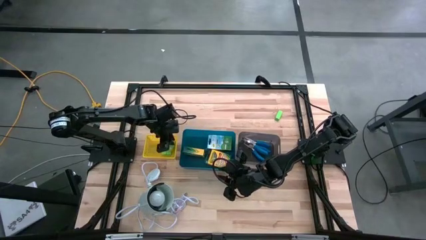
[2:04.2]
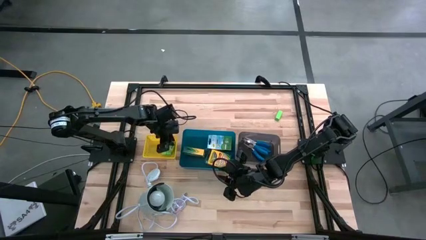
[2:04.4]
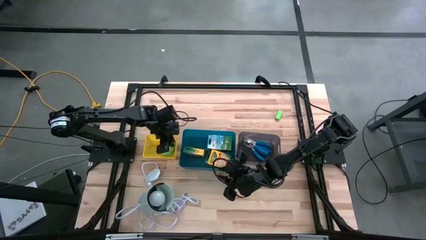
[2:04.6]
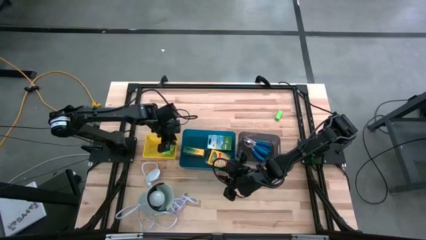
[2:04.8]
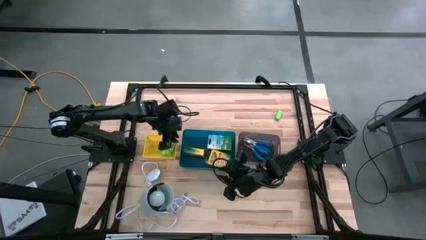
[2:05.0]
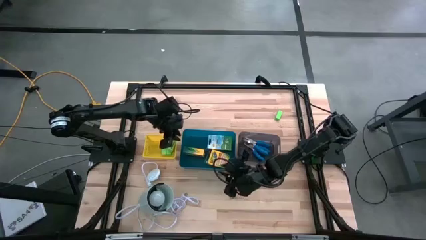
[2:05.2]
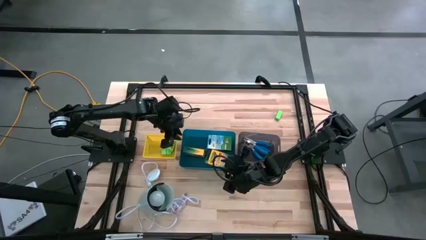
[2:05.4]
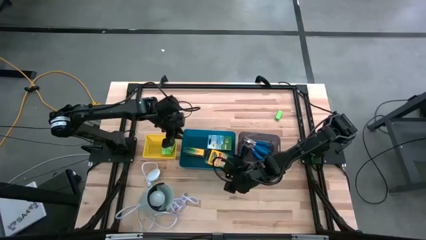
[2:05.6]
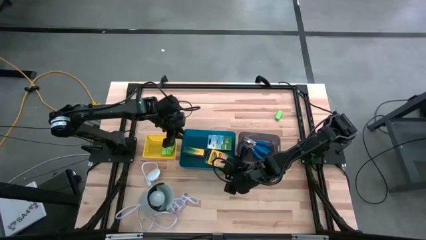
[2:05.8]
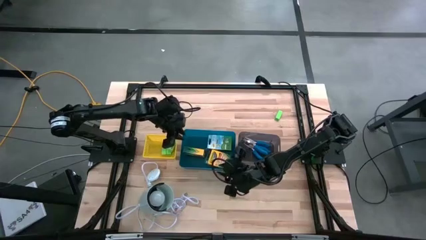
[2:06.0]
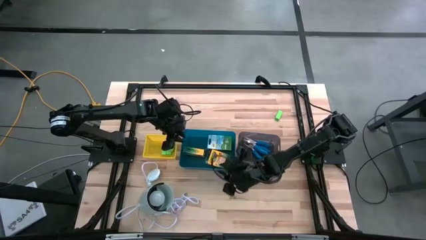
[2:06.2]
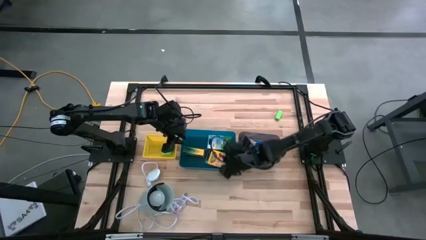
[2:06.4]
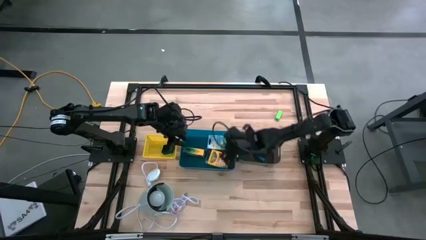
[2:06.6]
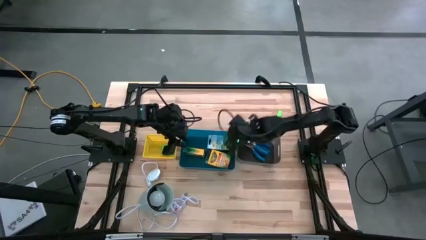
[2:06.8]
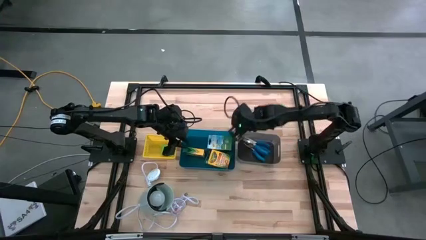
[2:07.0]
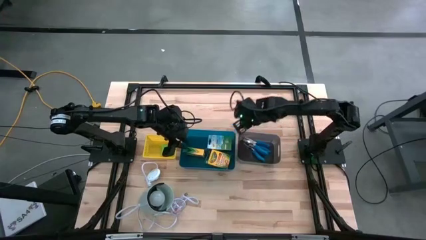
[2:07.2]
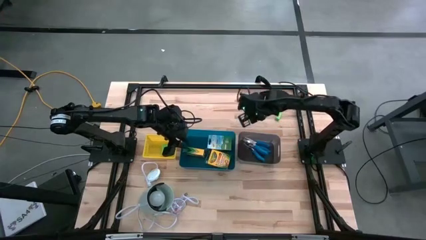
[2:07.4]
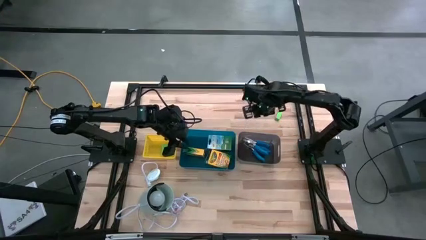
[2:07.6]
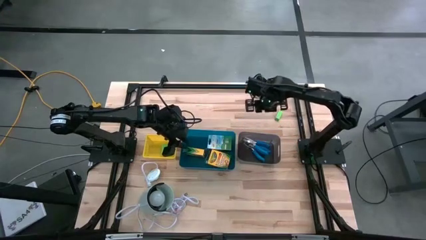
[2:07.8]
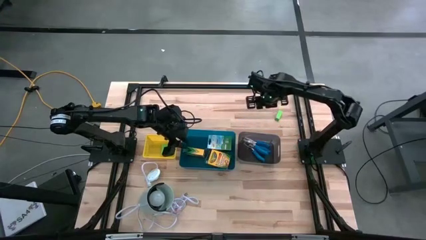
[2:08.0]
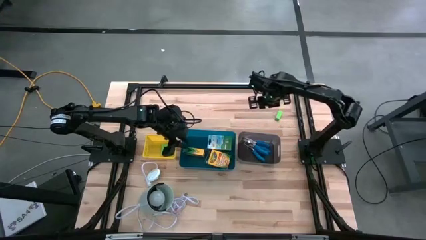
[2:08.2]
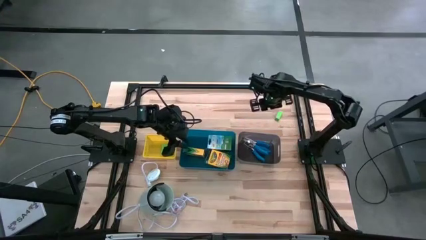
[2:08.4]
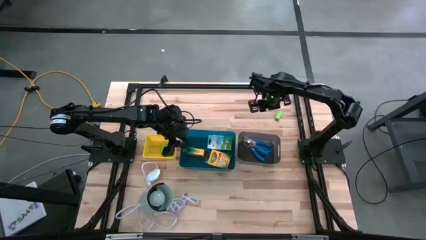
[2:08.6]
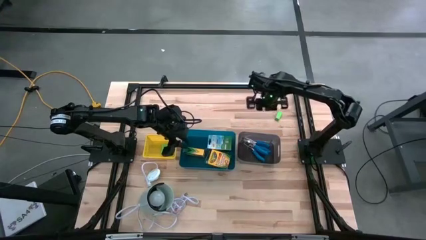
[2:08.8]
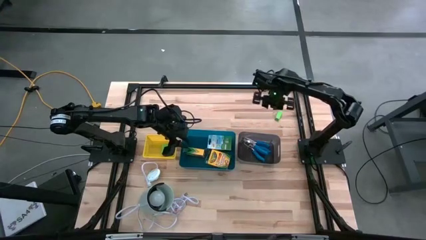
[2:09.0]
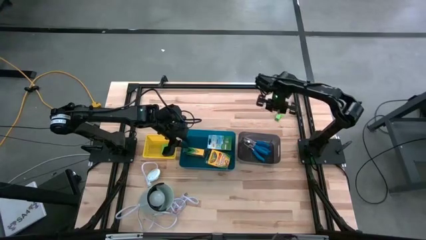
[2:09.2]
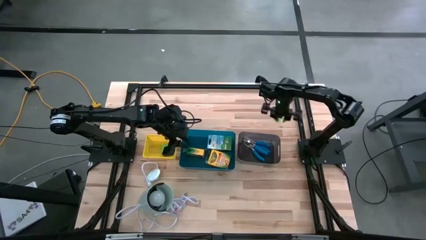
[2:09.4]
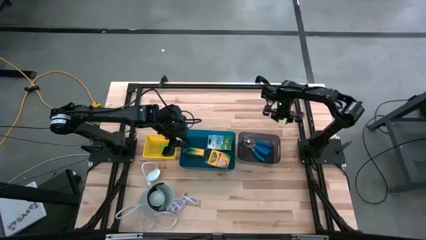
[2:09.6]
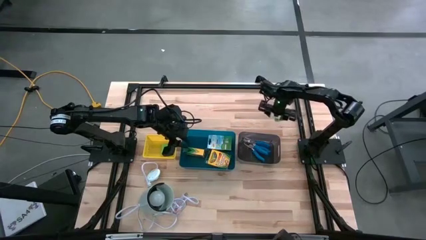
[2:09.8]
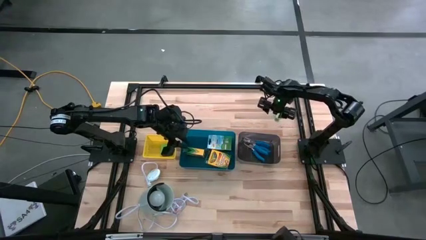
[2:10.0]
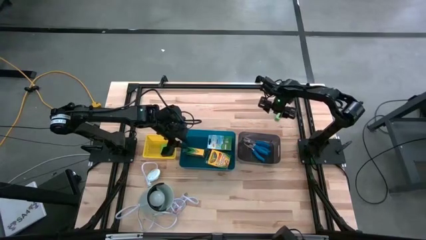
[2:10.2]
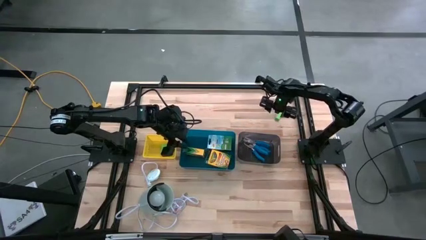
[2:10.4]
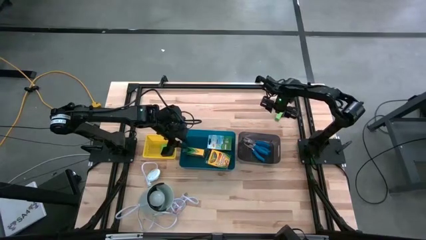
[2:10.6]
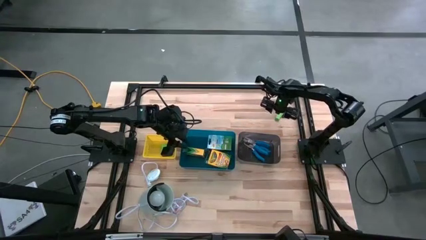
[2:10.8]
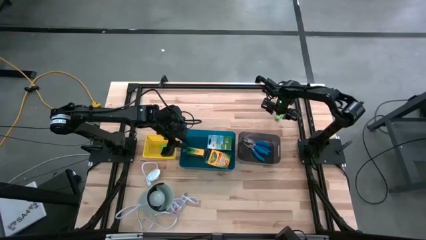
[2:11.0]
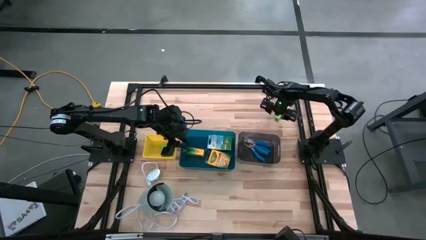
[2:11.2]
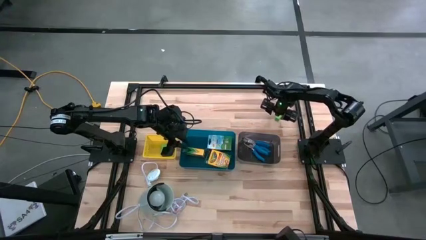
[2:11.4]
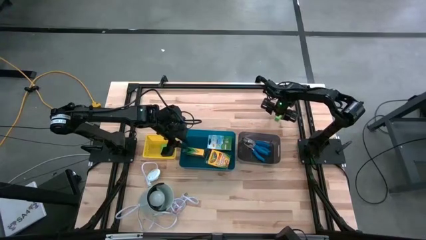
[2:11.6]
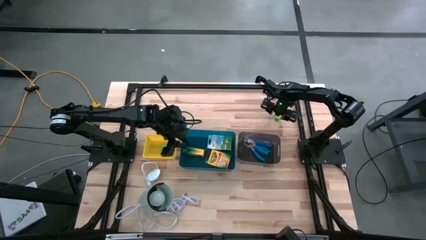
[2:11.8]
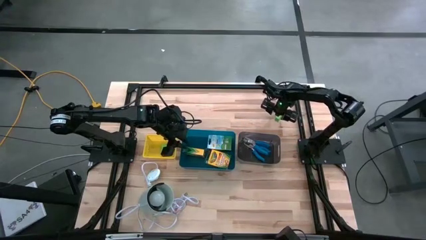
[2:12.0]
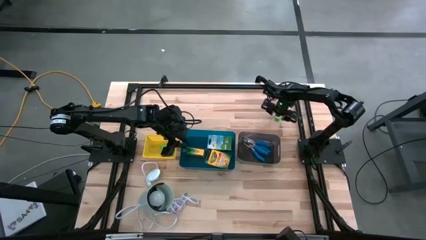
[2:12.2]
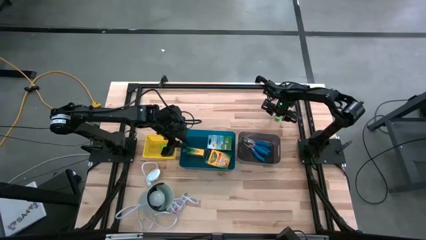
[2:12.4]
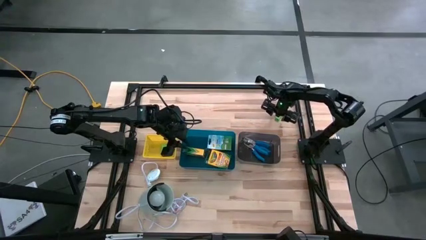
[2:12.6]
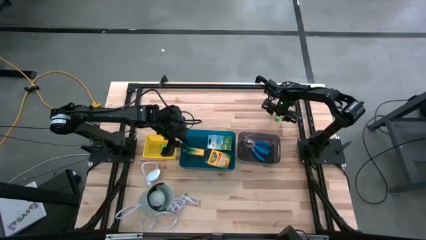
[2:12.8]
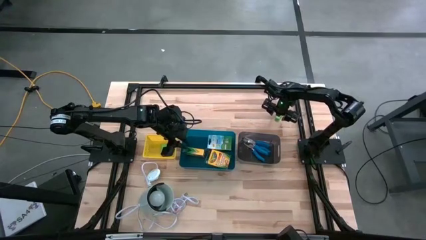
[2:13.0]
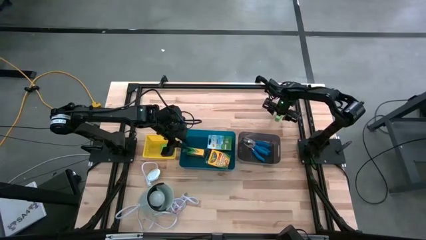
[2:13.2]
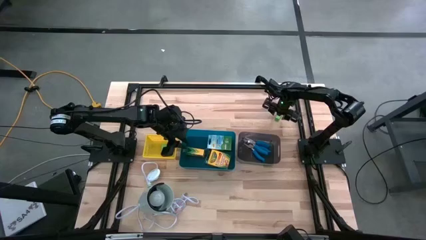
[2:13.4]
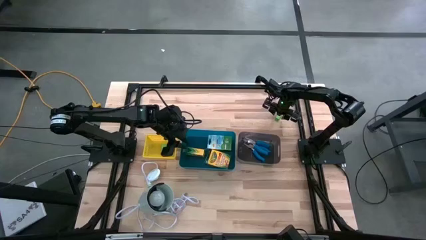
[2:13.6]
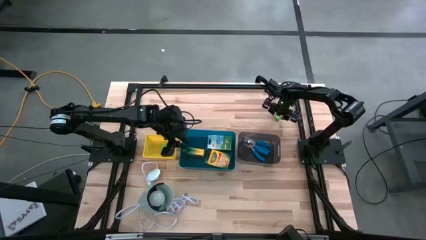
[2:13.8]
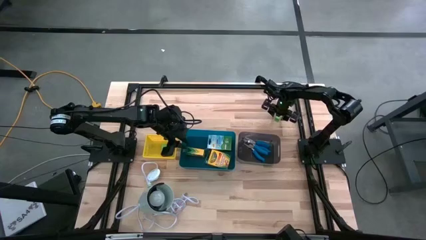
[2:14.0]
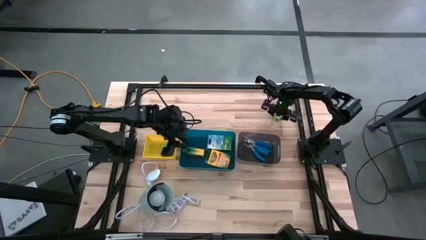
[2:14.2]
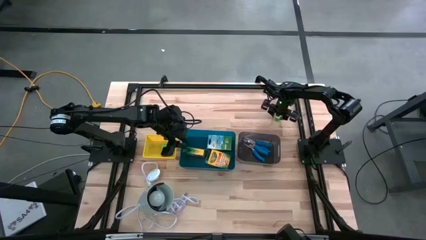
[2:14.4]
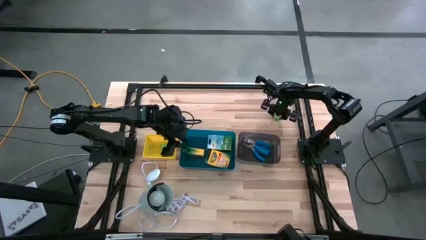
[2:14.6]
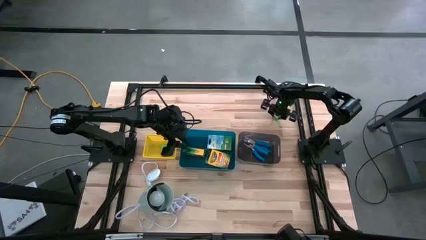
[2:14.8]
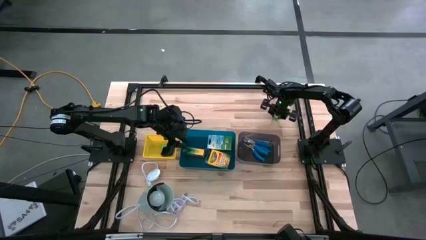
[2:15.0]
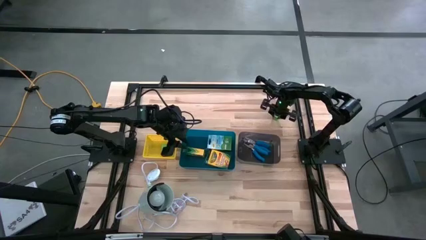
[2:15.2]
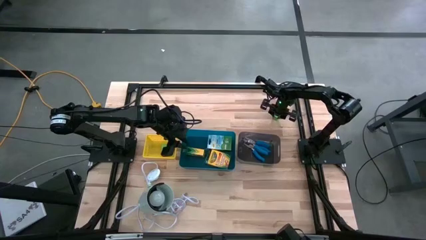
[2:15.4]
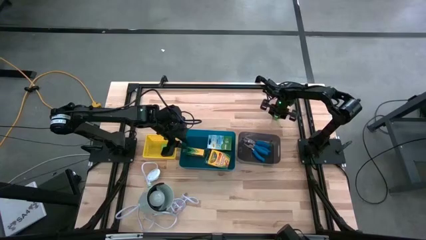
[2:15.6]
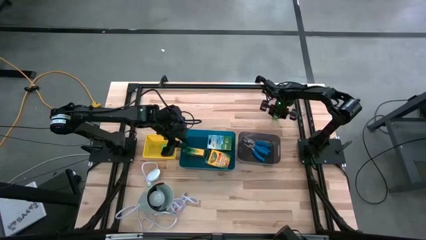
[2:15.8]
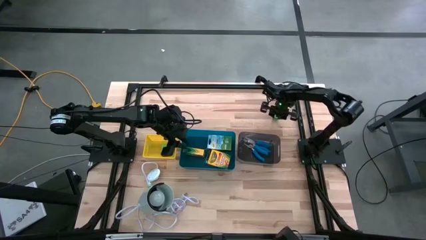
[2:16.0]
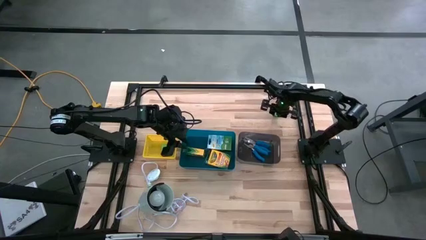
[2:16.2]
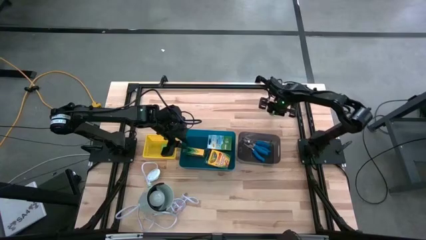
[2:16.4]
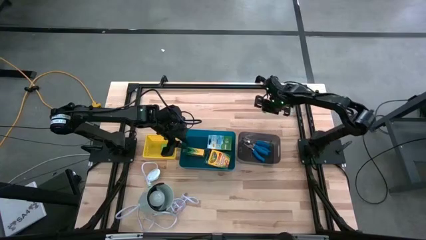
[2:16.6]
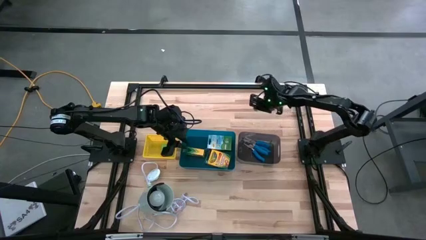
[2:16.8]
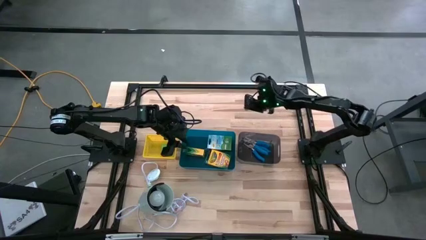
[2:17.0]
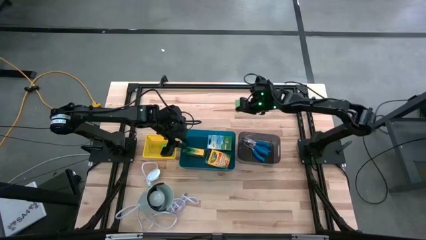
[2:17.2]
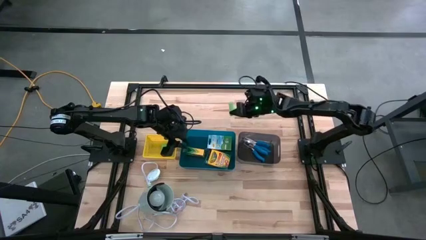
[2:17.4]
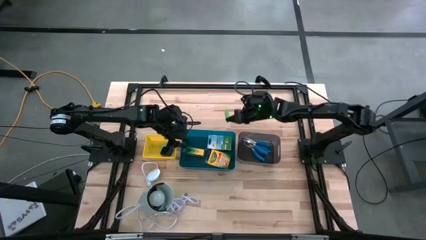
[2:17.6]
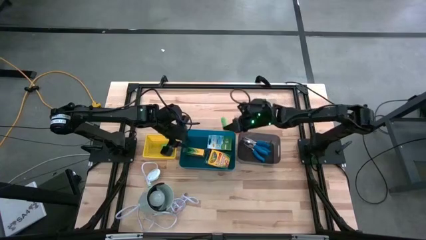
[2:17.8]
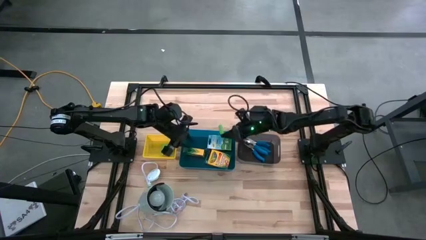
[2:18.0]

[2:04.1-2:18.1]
Task: Pick & Place School Supplies
Put the green eraser into the yellow bin

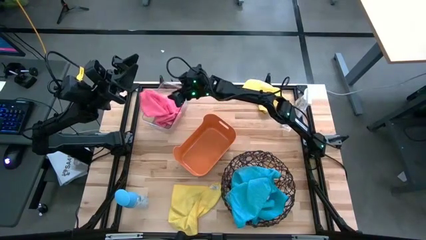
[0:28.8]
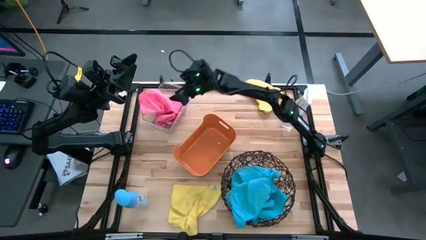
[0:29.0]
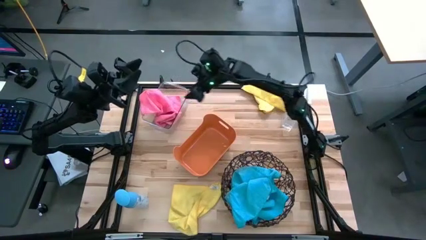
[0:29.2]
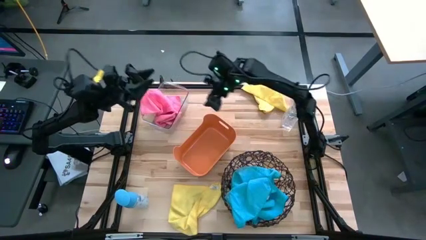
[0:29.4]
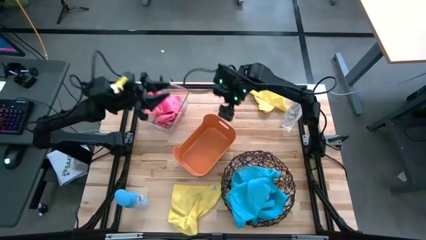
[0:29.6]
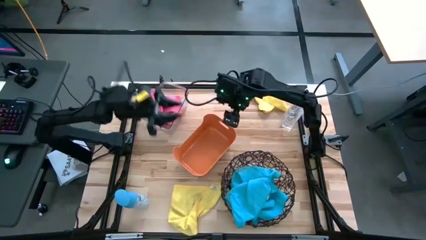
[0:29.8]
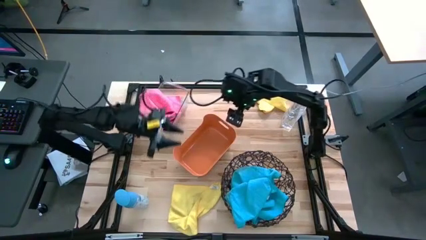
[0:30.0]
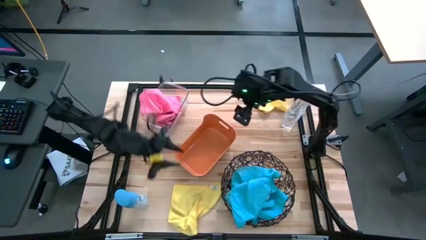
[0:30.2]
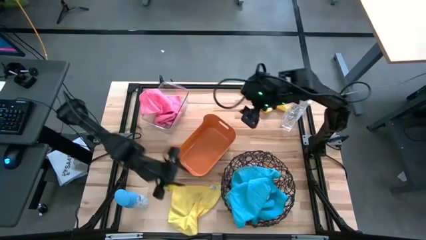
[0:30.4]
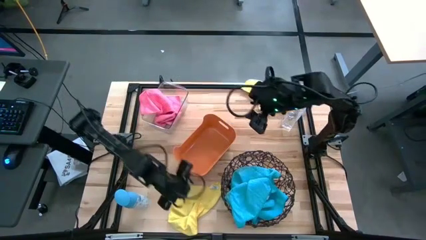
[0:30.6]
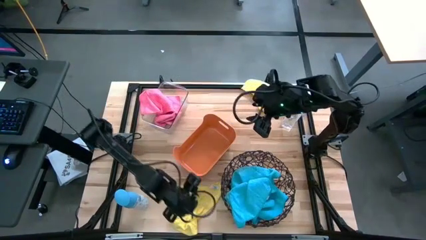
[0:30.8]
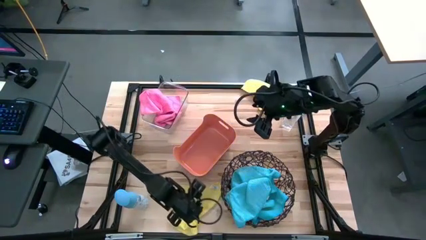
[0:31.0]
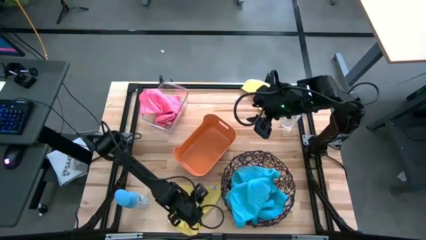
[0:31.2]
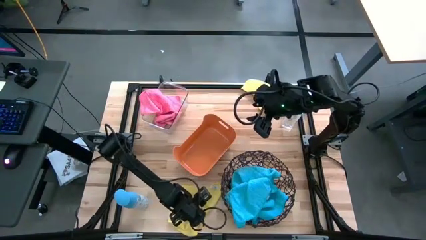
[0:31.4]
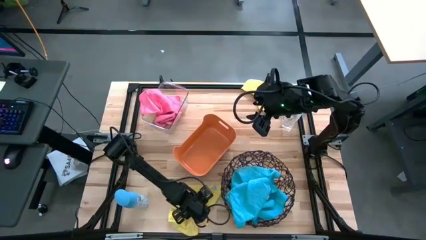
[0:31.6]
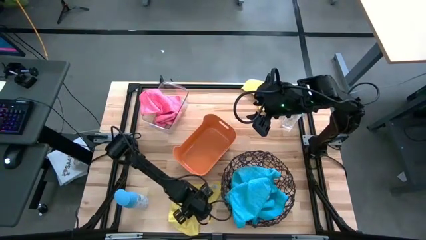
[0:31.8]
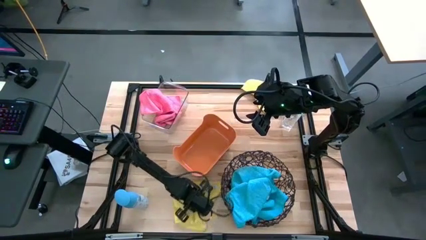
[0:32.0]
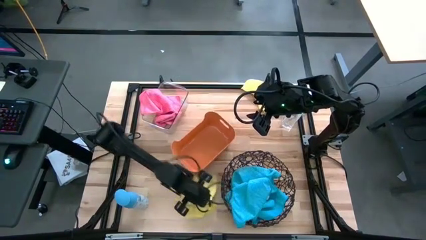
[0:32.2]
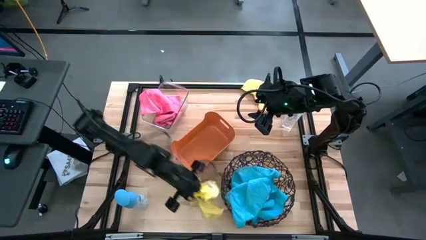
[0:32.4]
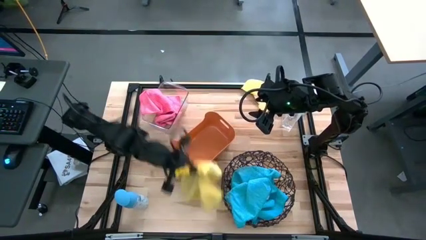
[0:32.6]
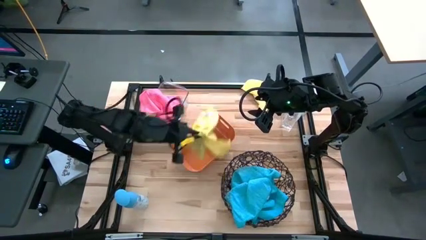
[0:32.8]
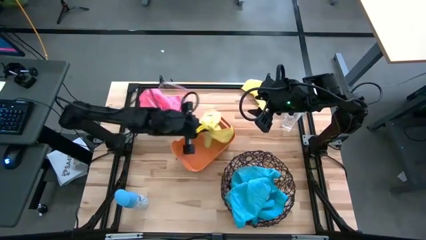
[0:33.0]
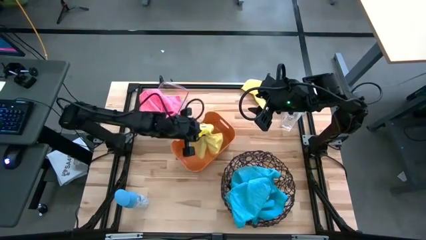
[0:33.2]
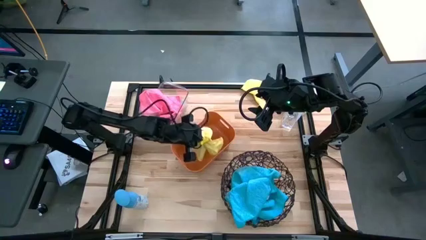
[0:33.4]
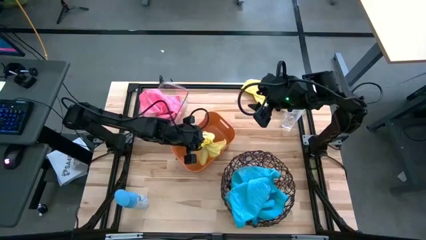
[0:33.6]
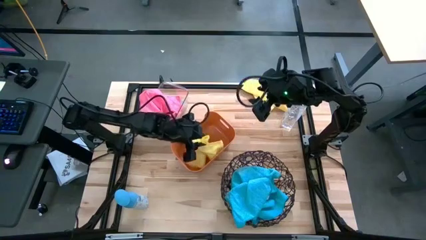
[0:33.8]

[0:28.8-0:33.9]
Task: Sort microfiber towel by color & place in baskets
Put the bottom yellow towel into the orange bin
